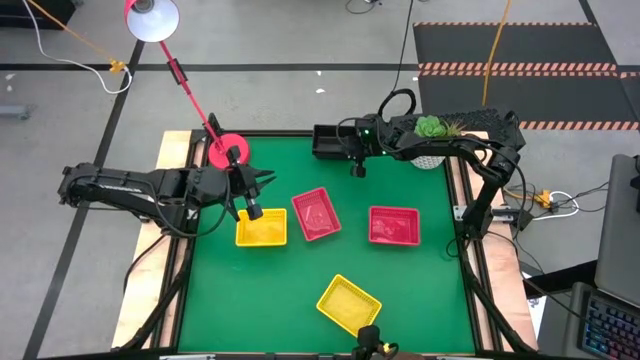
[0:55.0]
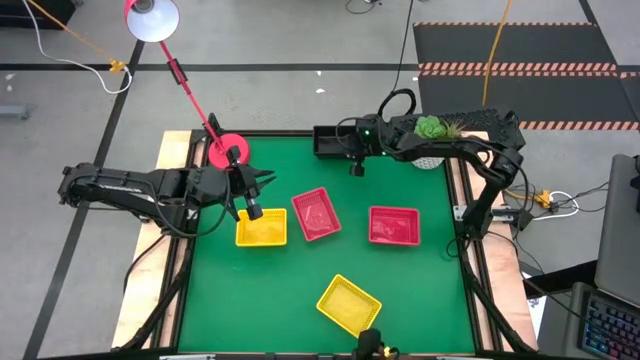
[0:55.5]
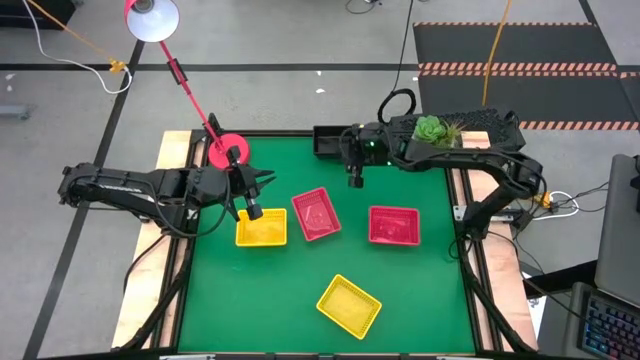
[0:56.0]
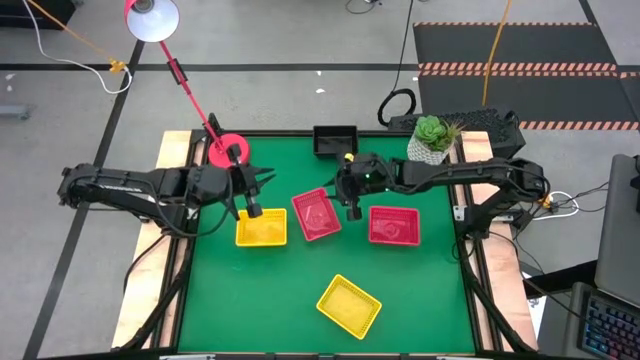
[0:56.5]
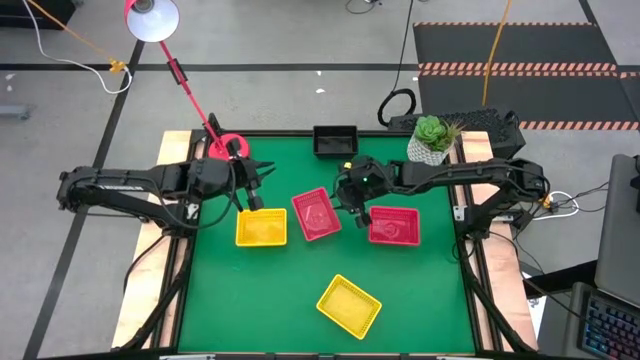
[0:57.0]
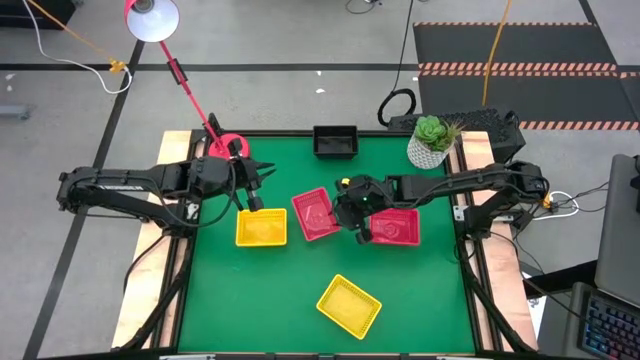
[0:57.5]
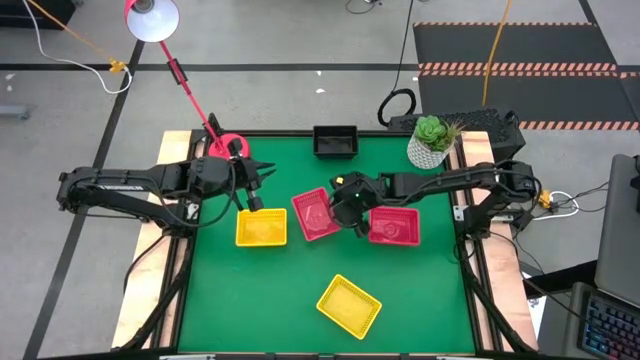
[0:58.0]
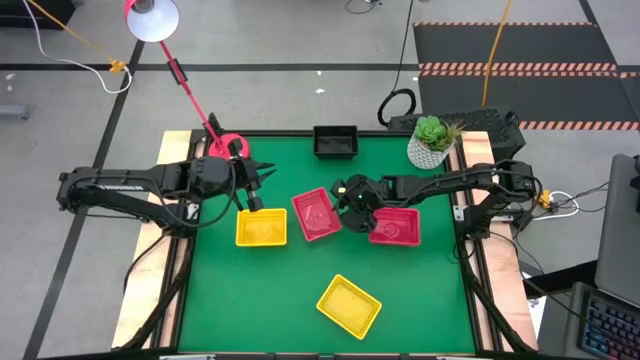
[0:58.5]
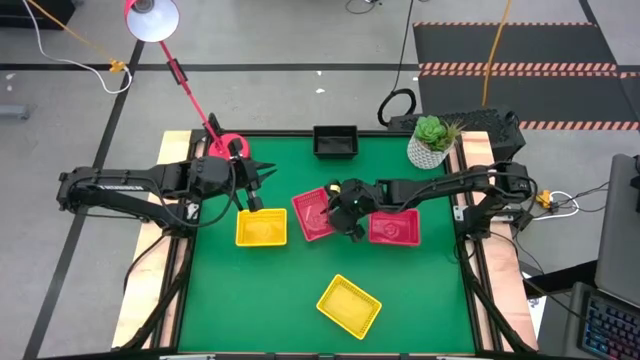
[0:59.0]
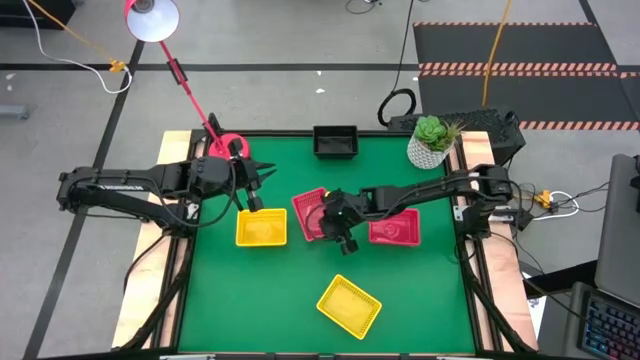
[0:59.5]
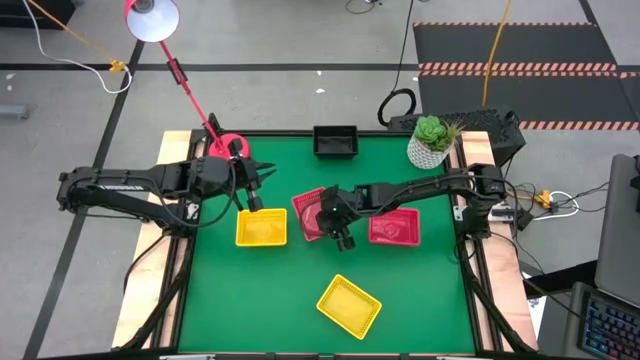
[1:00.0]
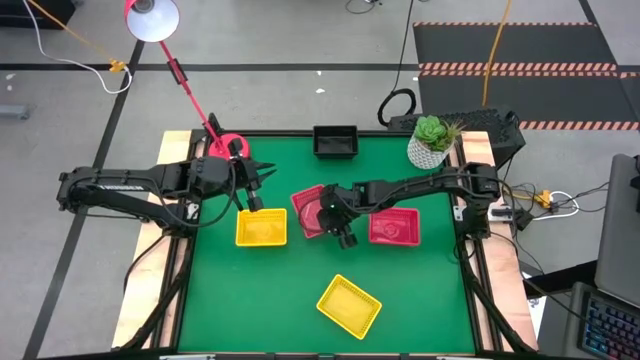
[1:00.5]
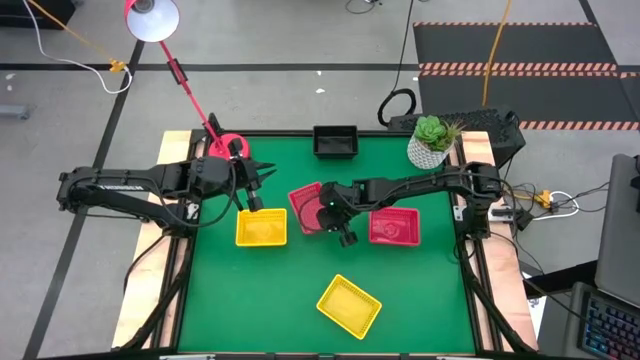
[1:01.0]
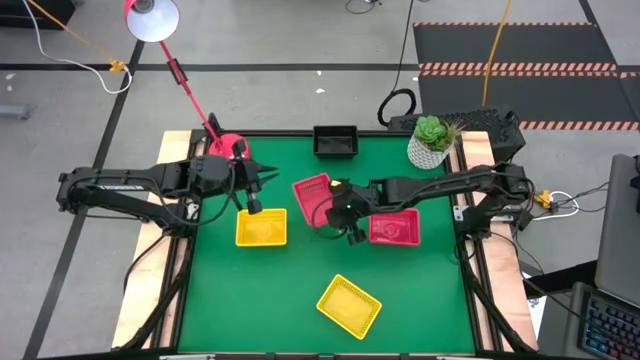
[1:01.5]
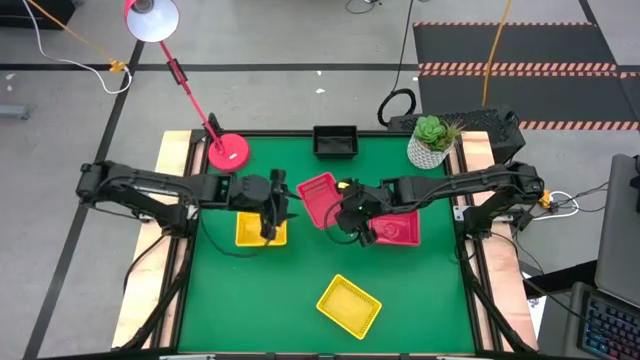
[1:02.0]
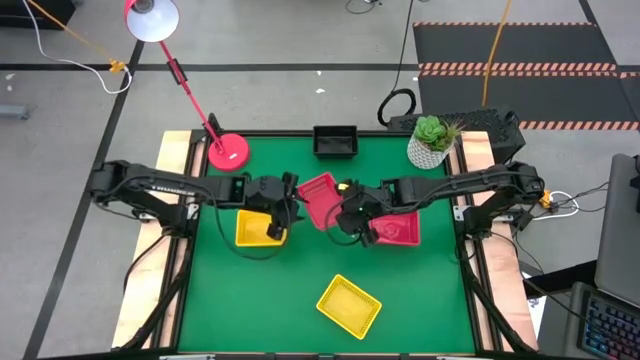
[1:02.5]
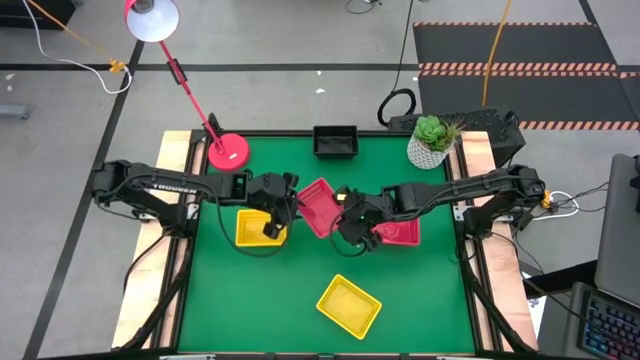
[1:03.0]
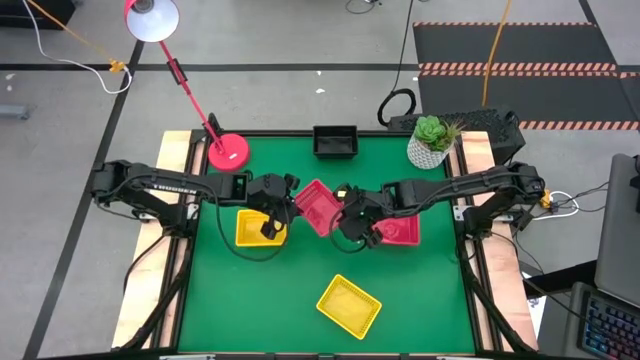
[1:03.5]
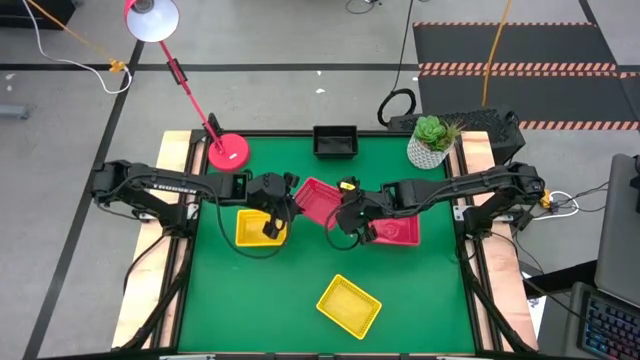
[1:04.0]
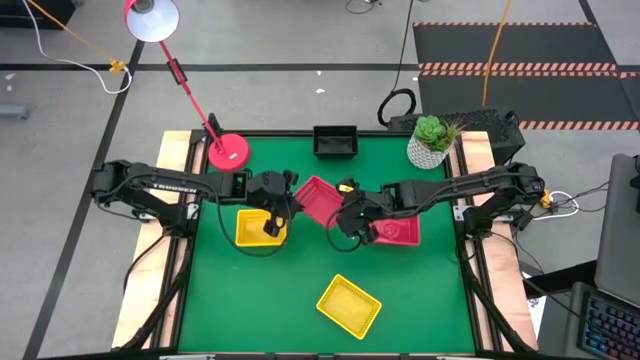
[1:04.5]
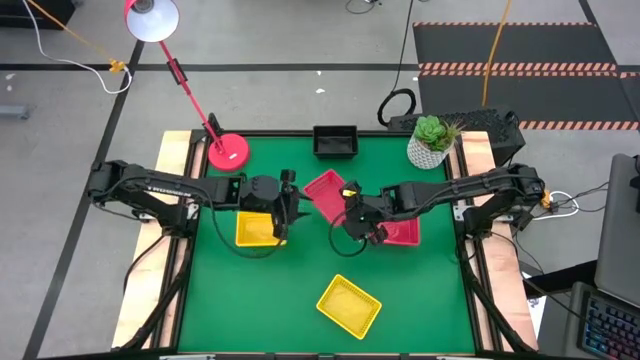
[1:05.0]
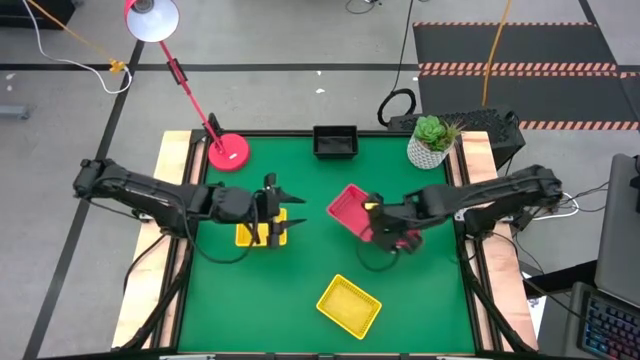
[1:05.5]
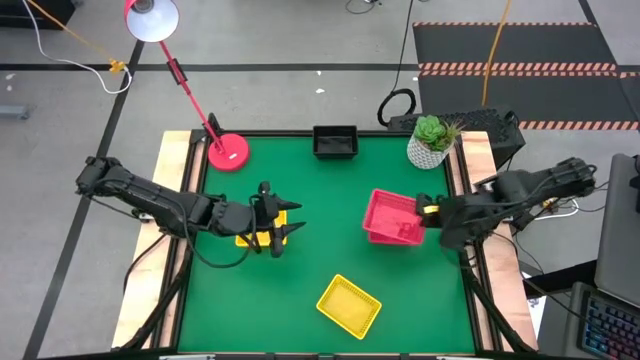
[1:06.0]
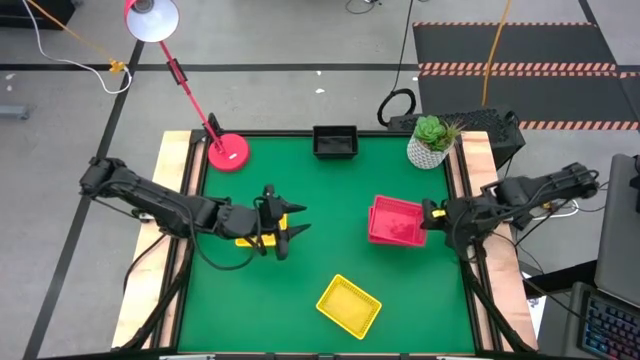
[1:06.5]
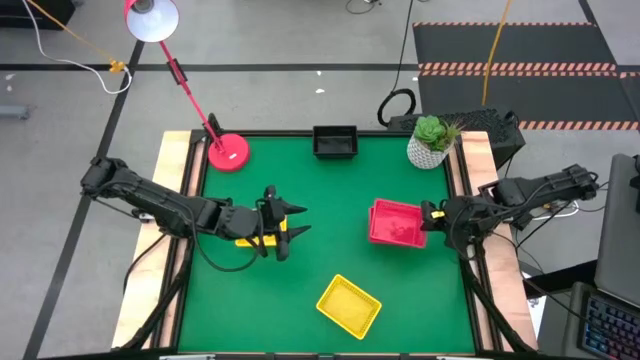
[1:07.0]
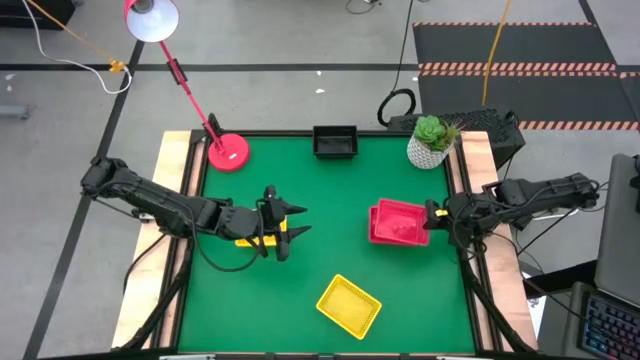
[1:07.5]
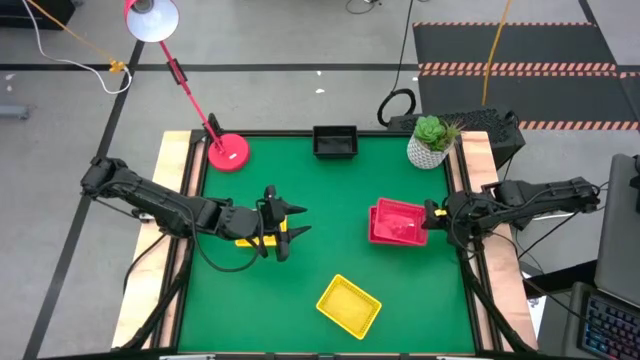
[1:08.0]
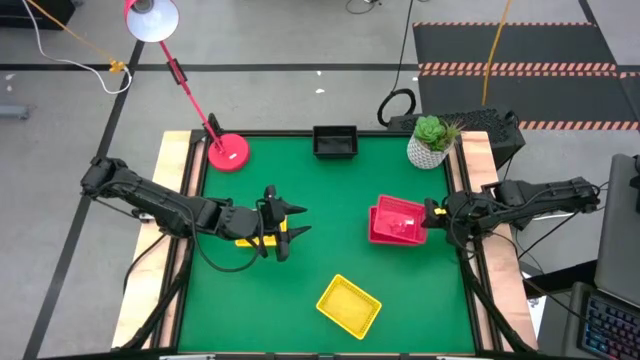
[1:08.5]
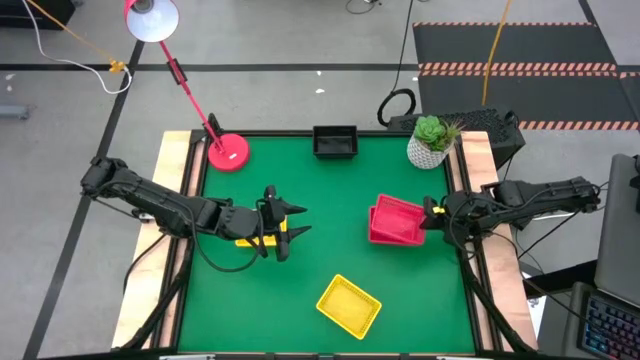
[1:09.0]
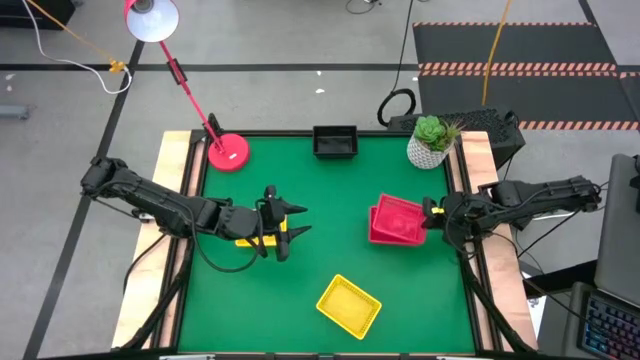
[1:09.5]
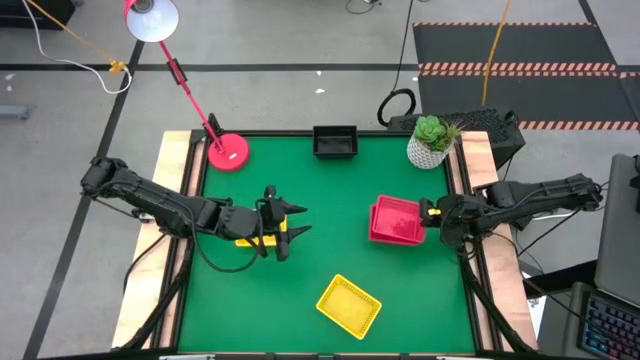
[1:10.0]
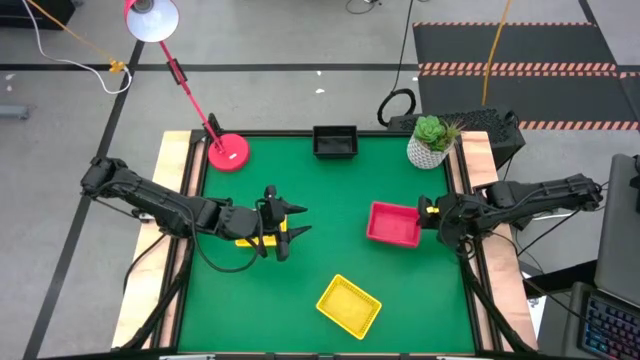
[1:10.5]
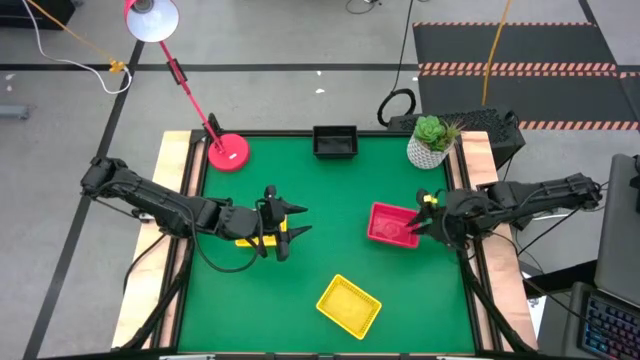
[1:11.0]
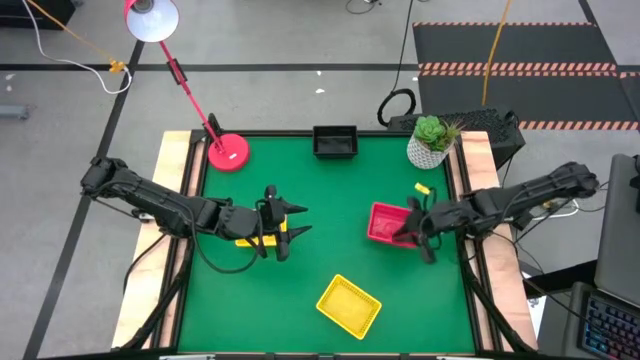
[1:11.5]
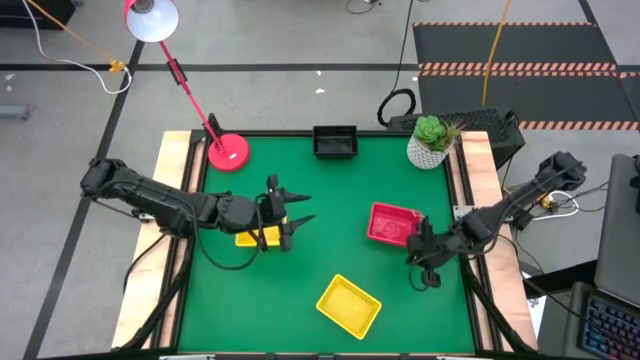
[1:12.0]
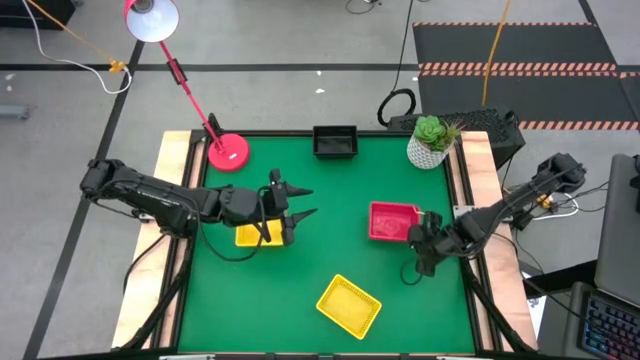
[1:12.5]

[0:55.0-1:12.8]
Stack the left red bin on the right stacked red bins
